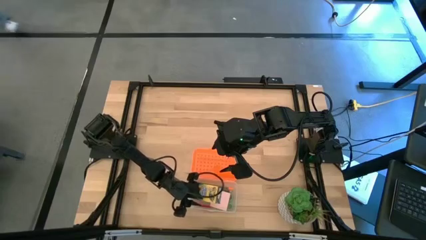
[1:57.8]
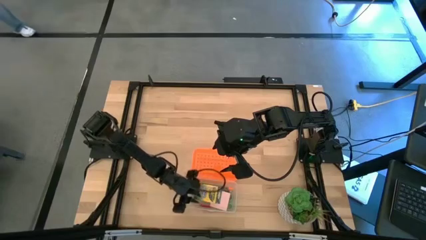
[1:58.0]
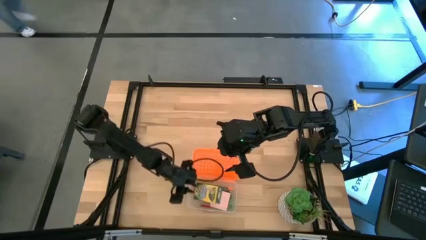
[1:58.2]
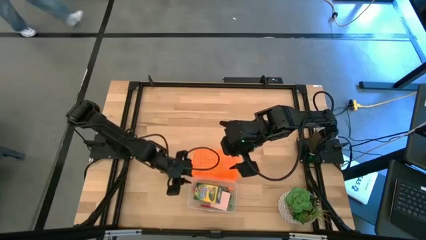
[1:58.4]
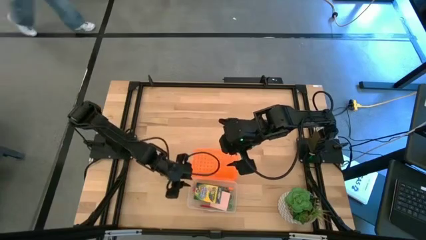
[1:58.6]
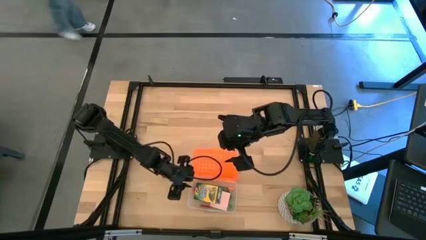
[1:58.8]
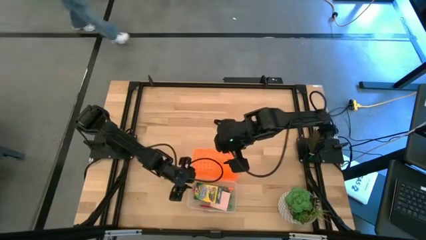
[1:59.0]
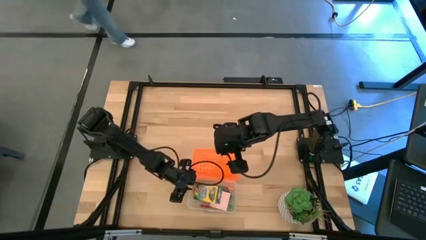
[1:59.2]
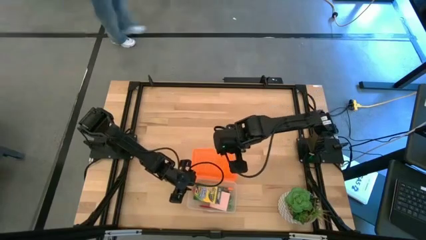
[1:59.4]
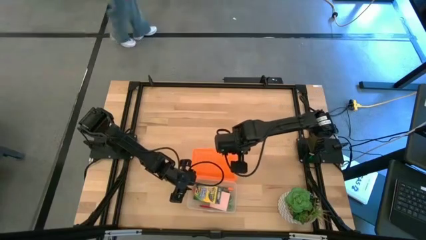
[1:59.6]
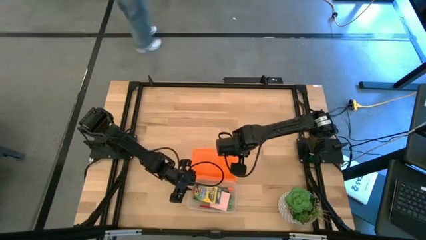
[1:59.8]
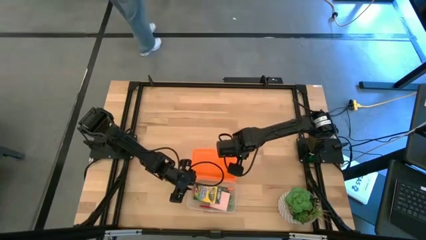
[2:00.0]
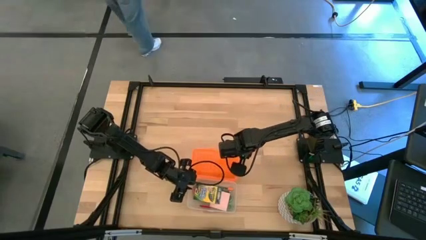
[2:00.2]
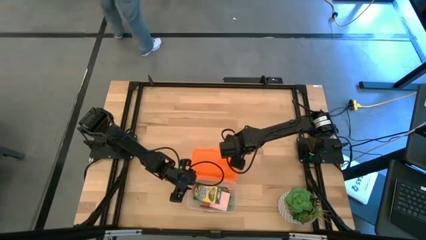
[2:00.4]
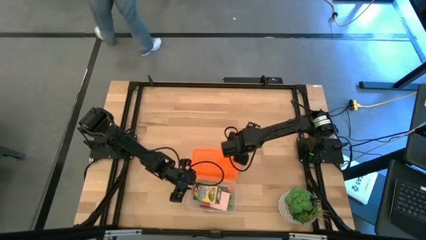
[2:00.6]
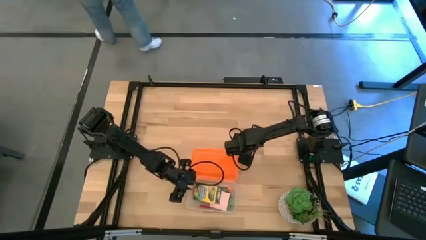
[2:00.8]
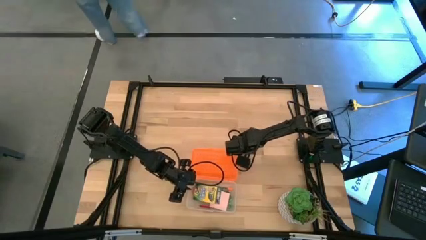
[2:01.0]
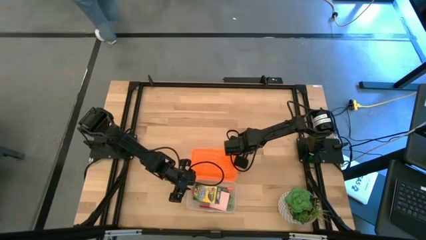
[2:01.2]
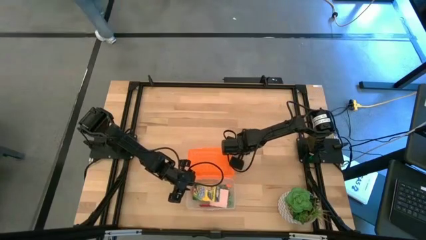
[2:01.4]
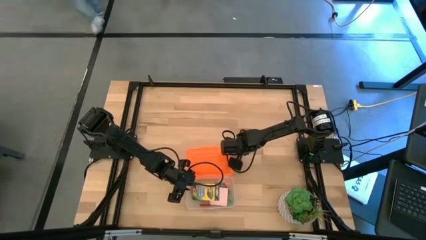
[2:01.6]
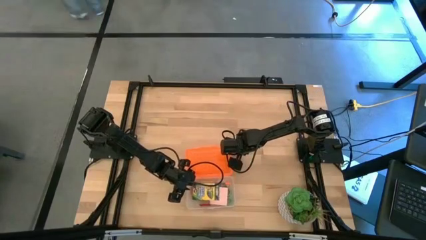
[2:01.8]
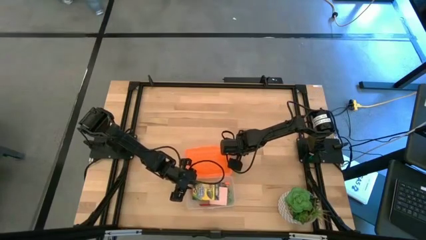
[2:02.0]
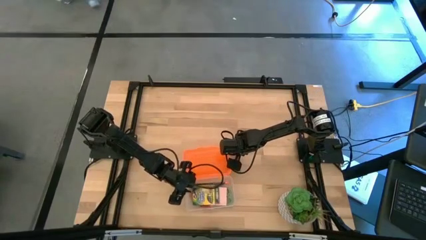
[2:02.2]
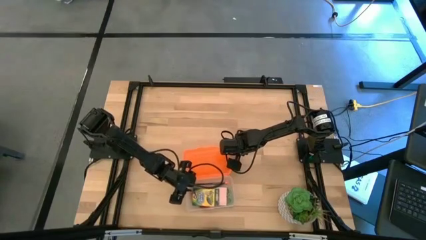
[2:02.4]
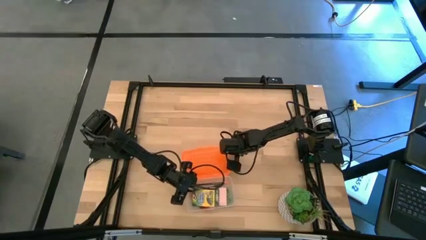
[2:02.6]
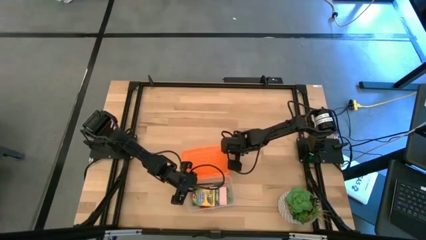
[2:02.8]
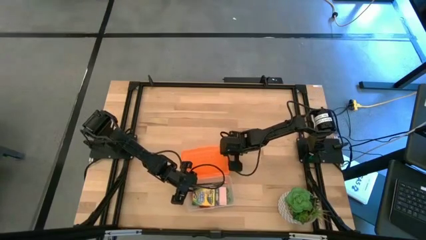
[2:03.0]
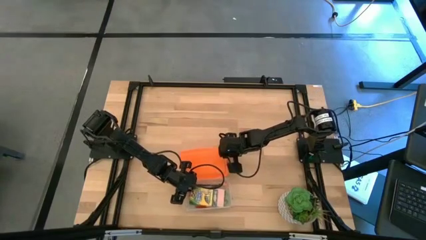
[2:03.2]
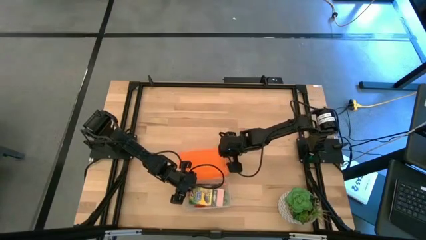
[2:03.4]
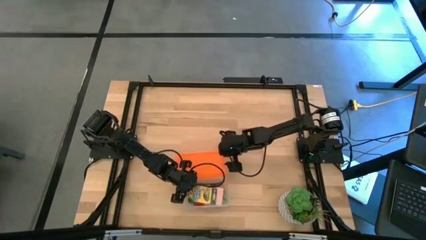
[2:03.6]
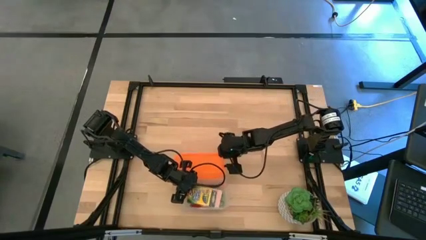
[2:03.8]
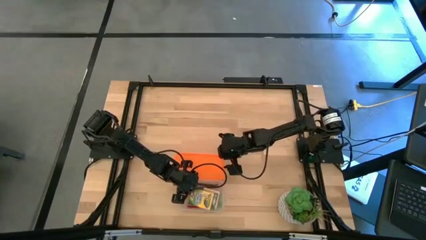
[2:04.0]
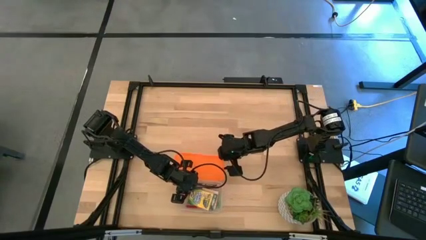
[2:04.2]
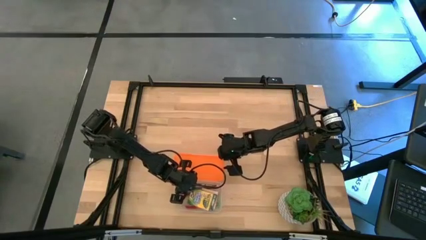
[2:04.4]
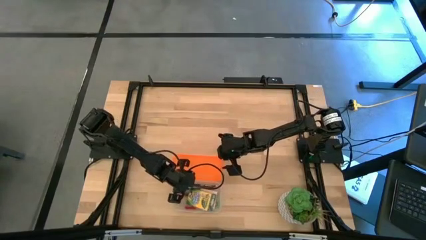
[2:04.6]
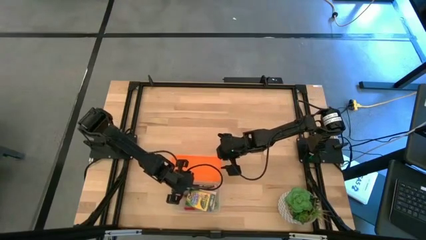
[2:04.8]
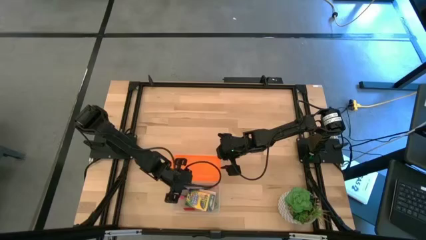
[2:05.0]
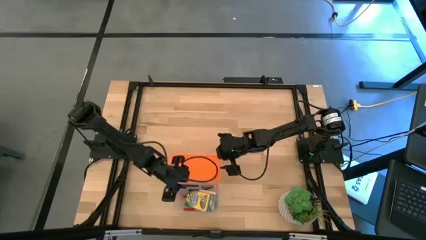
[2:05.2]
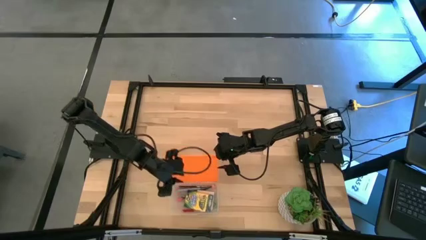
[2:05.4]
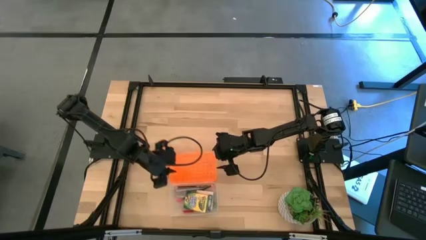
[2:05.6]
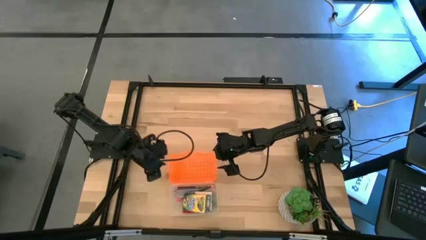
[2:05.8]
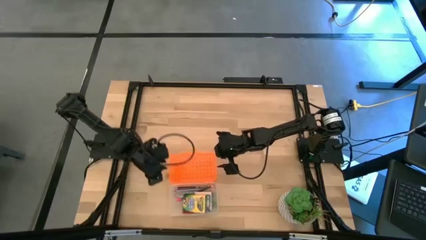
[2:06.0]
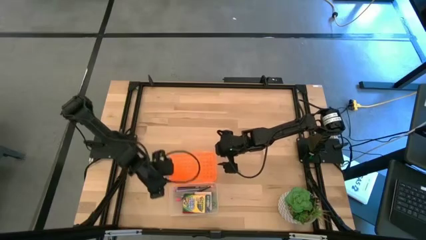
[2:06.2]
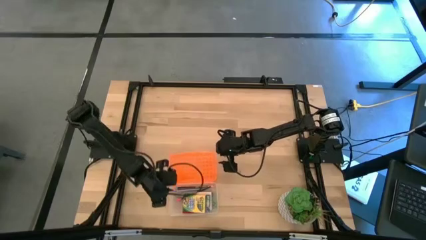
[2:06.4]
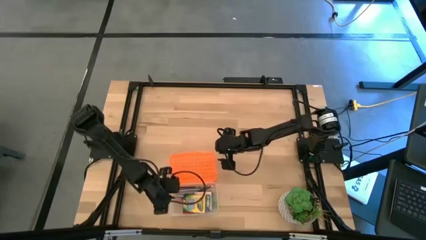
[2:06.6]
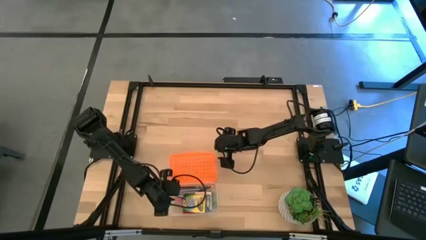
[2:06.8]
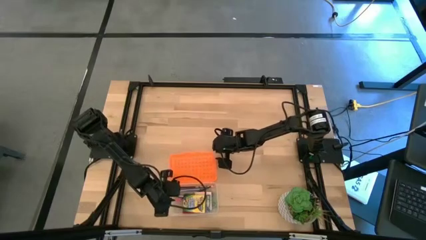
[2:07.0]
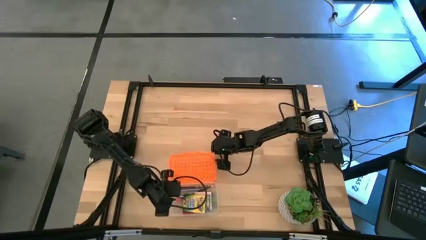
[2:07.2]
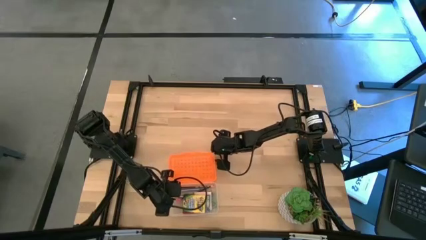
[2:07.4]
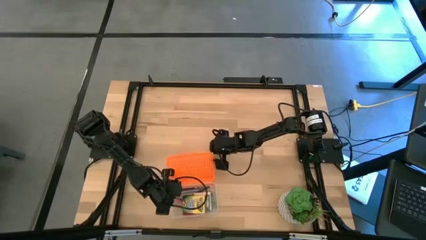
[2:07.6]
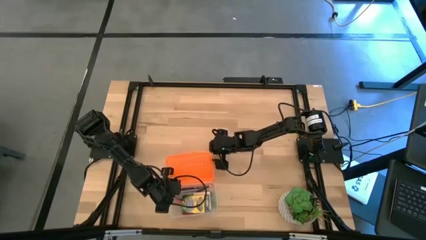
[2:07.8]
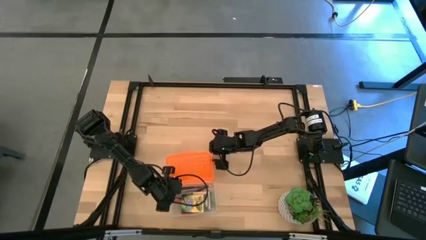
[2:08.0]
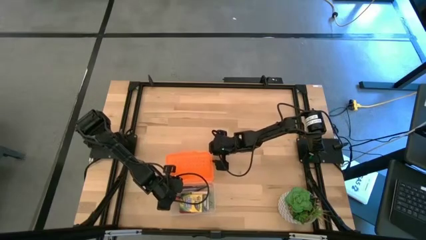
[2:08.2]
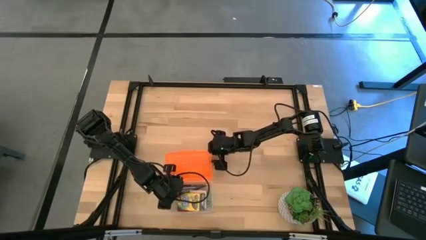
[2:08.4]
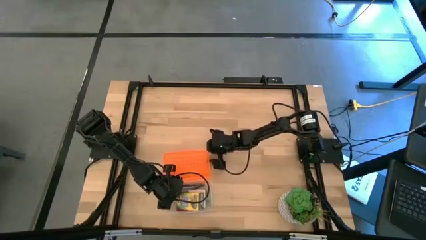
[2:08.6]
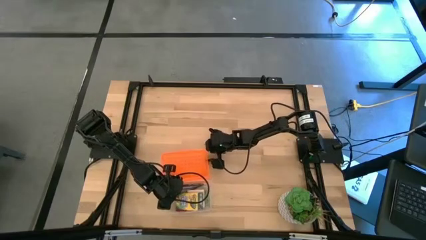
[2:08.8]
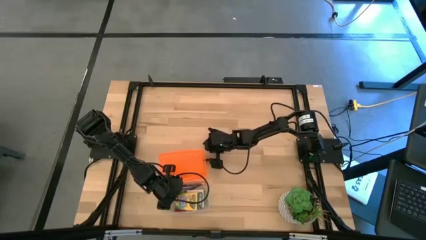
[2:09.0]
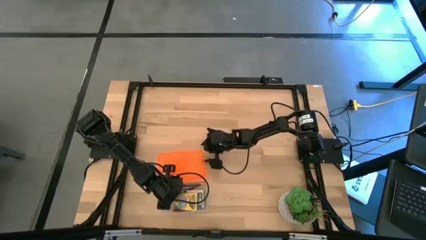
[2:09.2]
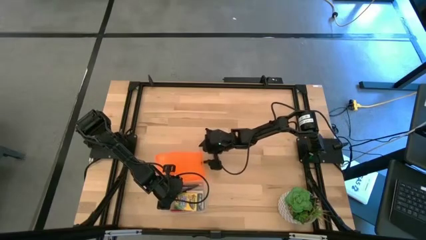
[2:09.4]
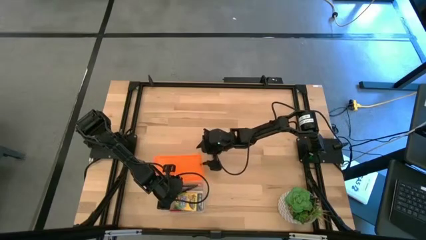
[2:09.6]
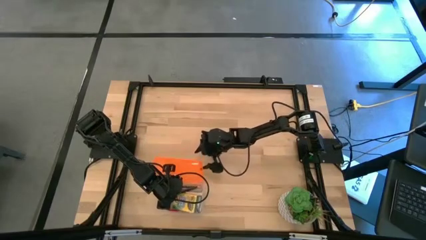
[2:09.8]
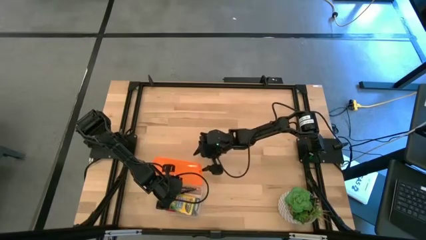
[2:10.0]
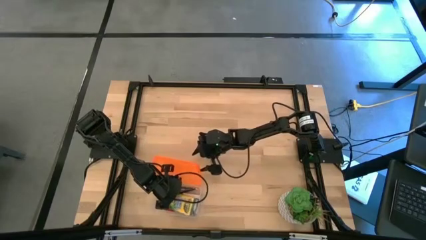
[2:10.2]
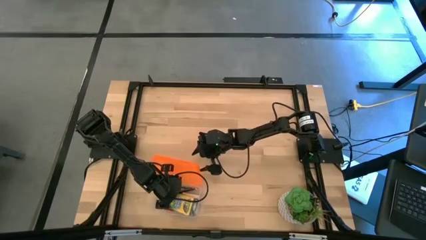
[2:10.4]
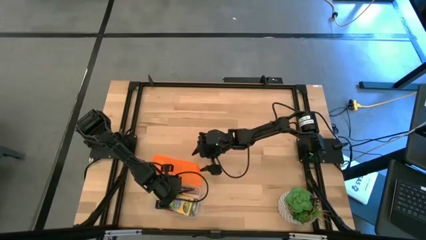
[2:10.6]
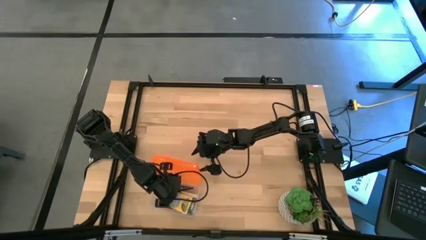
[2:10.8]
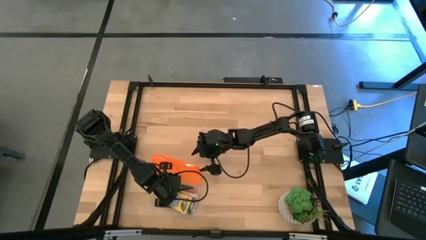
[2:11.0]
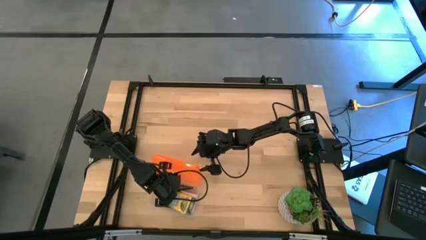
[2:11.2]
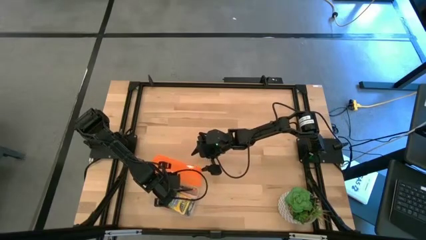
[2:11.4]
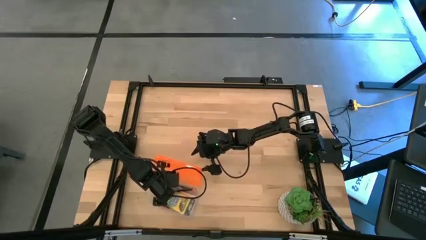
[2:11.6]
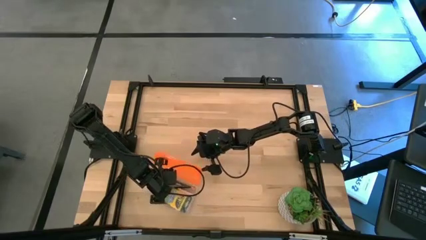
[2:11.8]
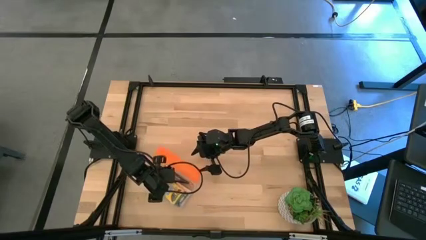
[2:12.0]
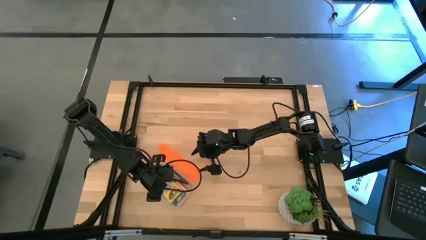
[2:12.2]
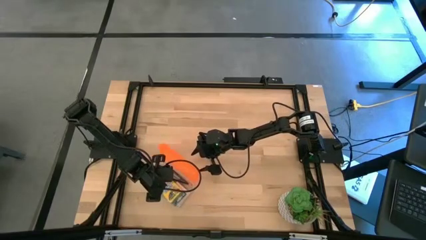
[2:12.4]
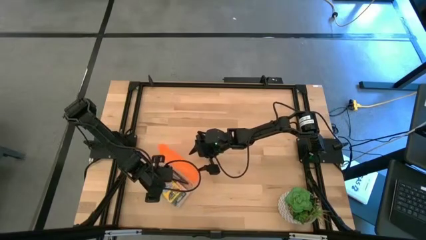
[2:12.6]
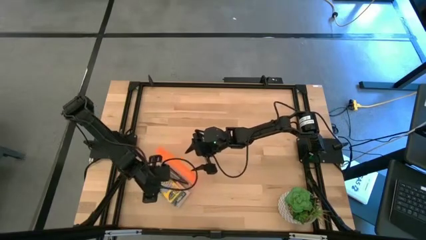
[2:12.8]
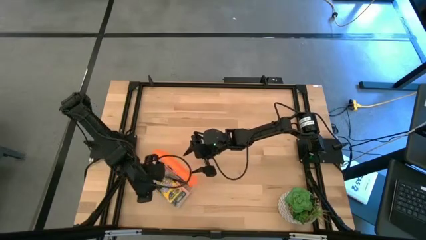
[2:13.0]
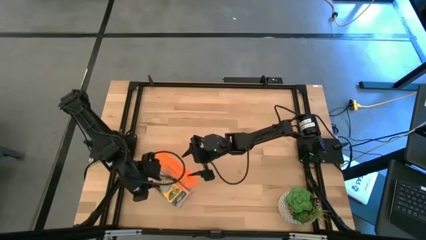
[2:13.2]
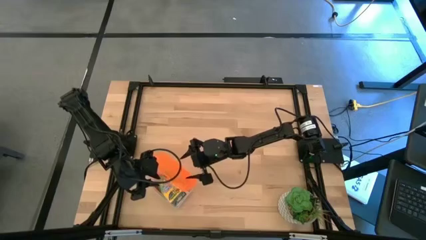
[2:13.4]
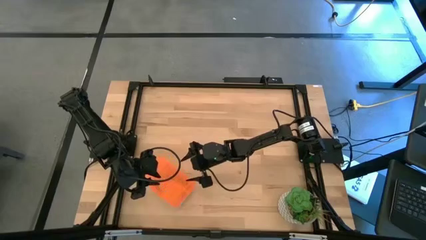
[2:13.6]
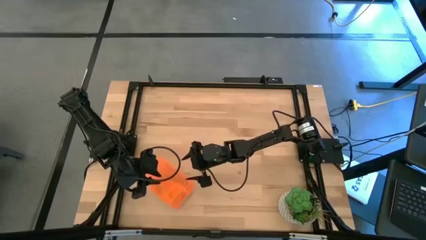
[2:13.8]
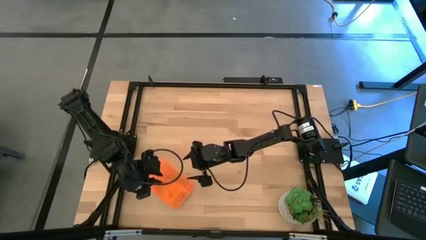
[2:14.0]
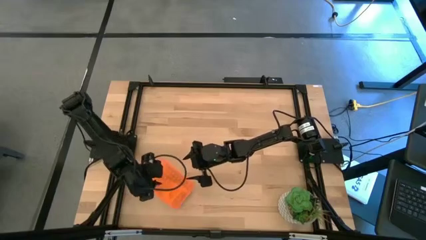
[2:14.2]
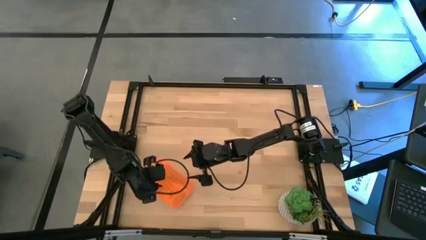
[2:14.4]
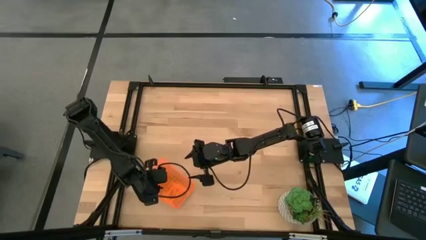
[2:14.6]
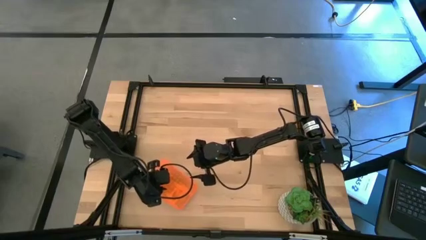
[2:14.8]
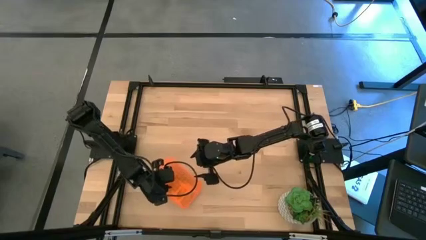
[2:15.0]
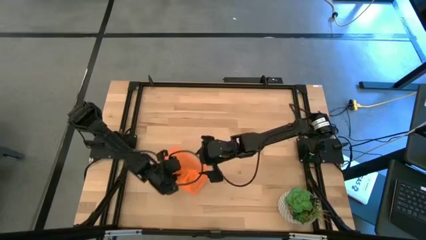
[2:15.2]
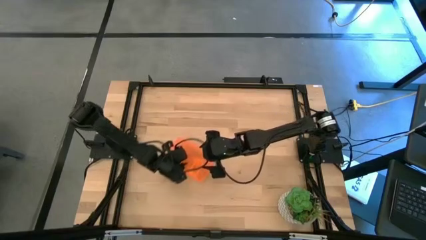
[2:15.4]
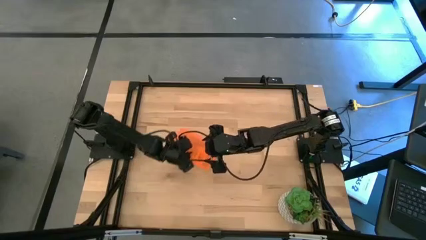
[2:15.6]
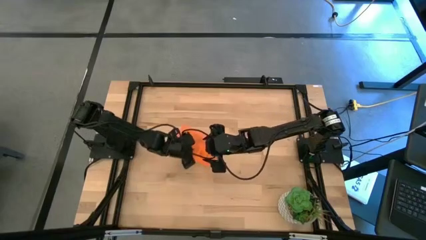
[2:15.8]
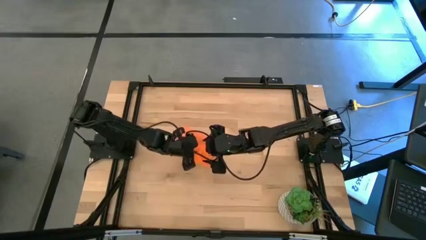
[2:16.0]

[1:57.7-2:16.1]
Task: Pack school essentials
Close the orange supply box
